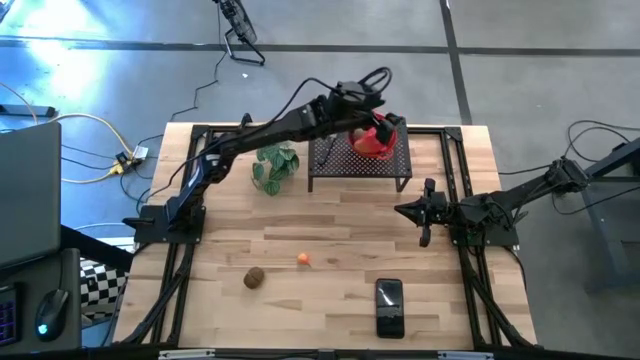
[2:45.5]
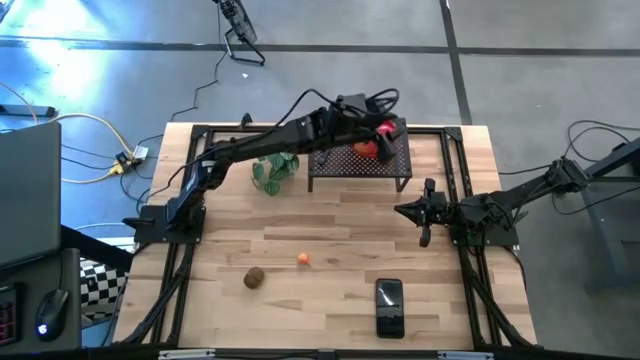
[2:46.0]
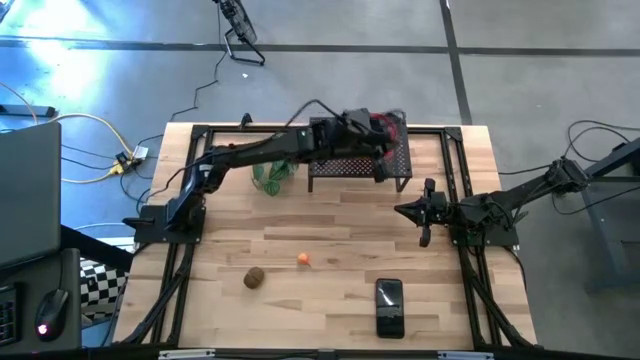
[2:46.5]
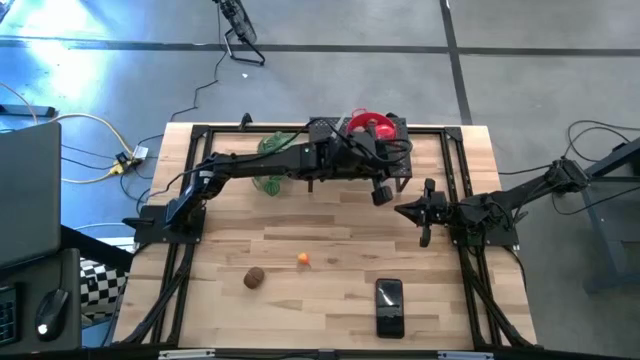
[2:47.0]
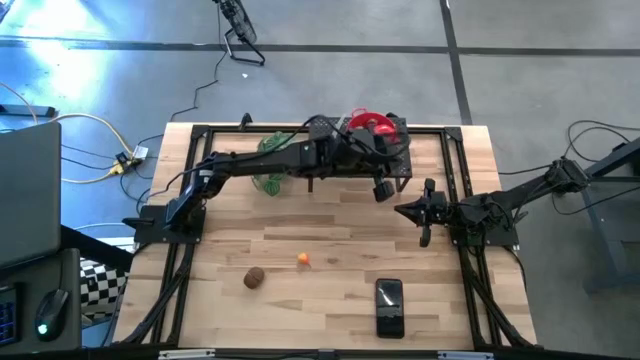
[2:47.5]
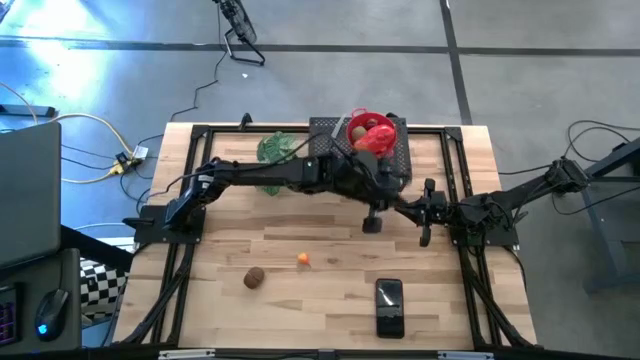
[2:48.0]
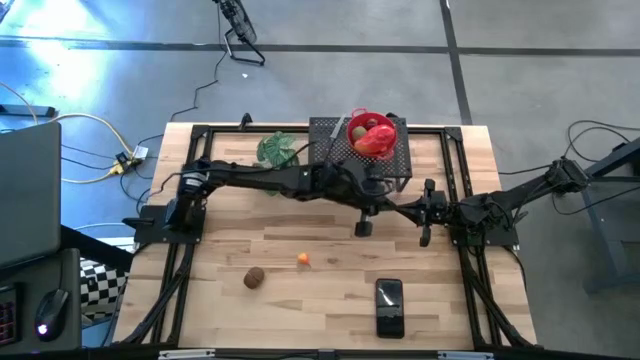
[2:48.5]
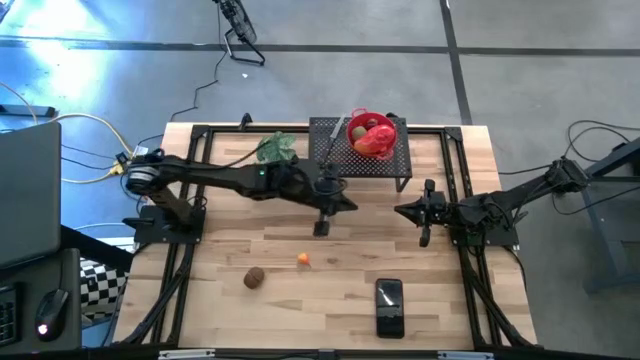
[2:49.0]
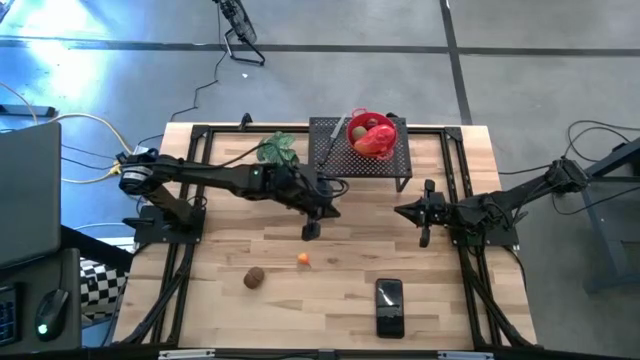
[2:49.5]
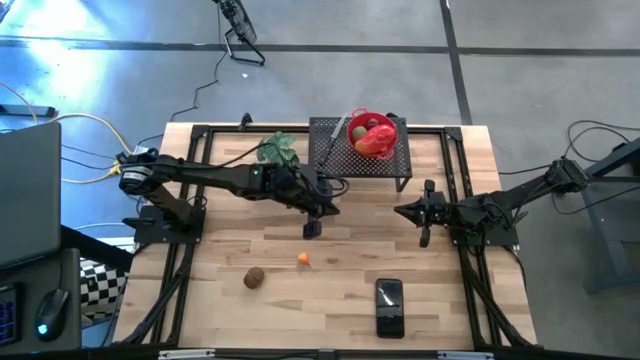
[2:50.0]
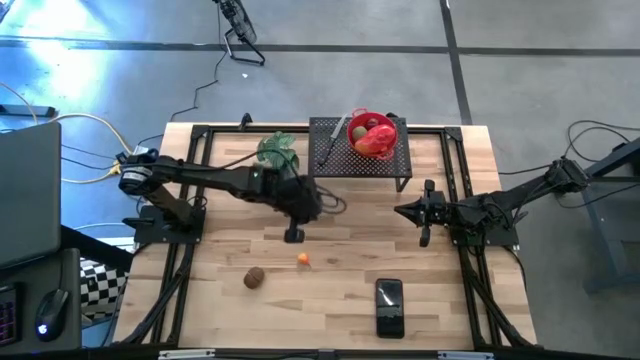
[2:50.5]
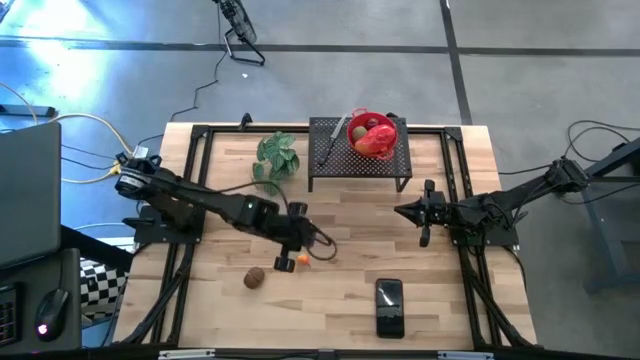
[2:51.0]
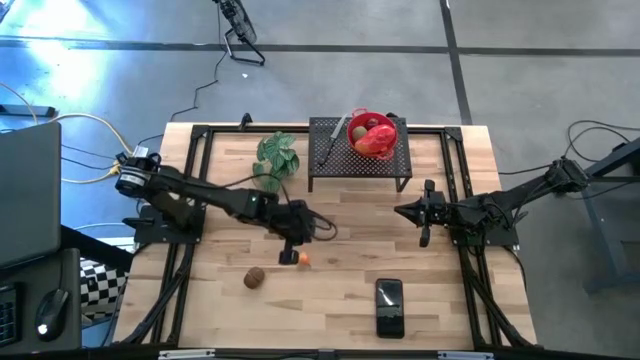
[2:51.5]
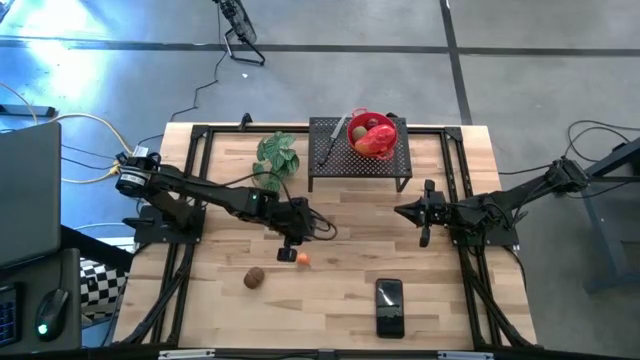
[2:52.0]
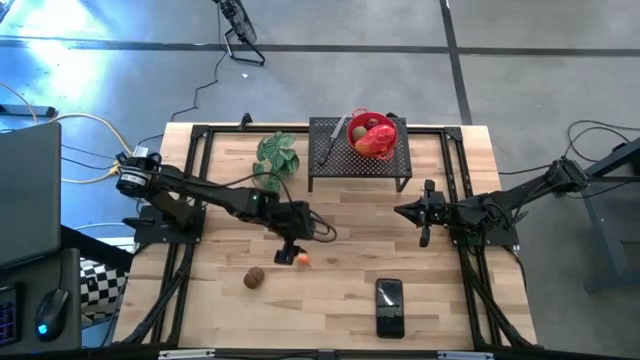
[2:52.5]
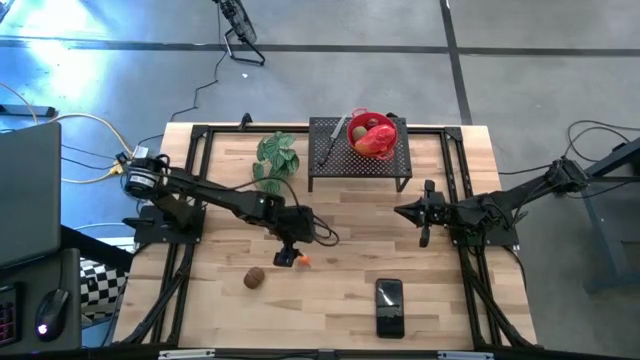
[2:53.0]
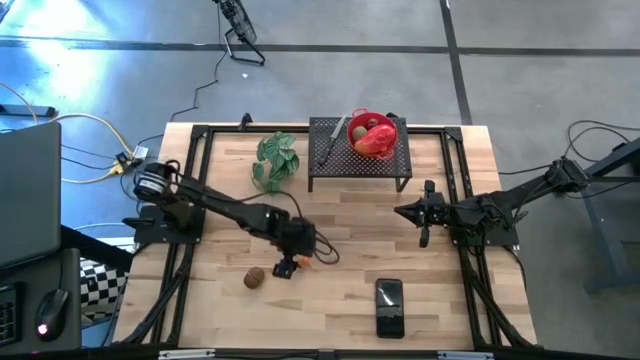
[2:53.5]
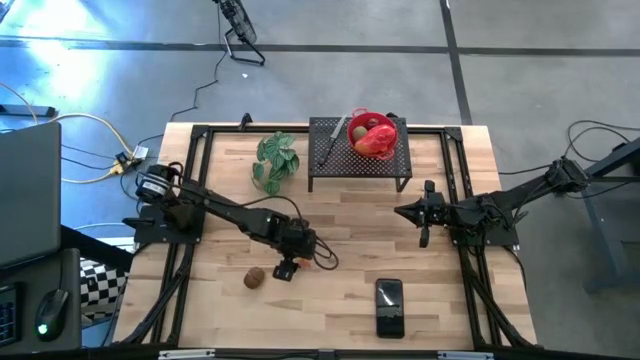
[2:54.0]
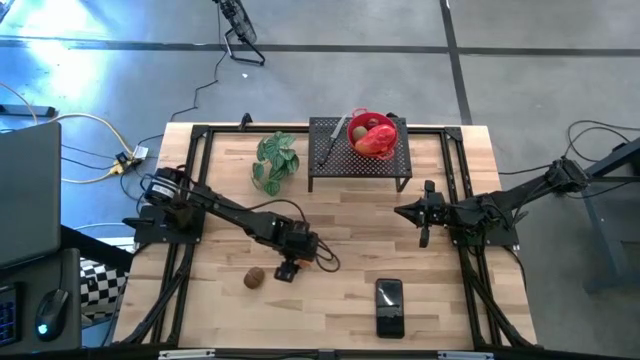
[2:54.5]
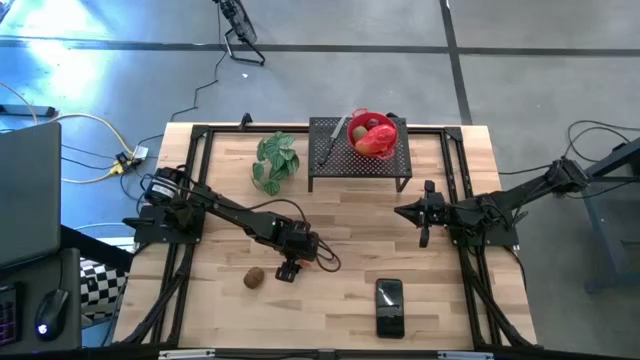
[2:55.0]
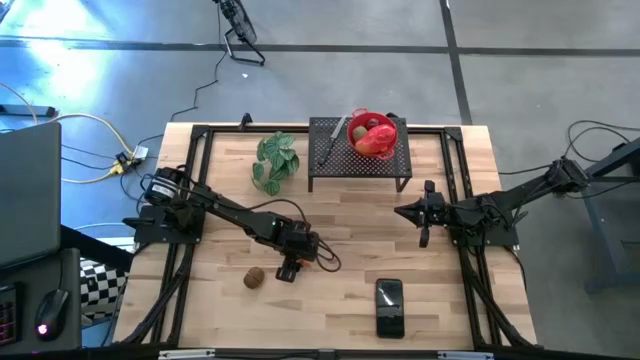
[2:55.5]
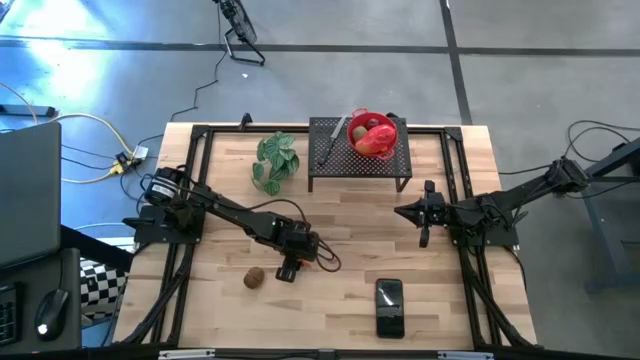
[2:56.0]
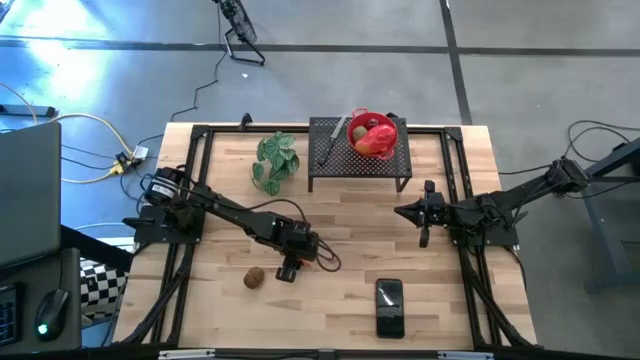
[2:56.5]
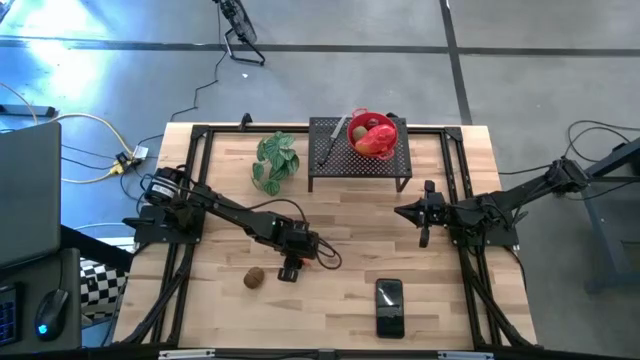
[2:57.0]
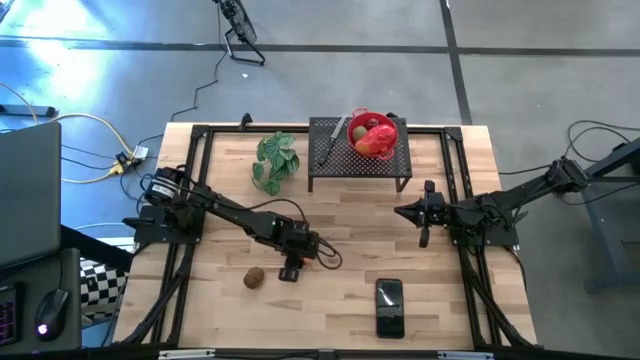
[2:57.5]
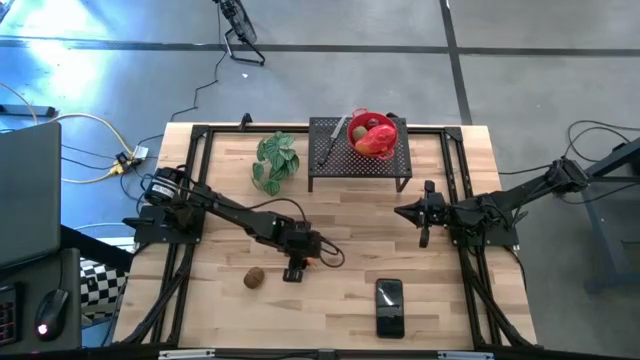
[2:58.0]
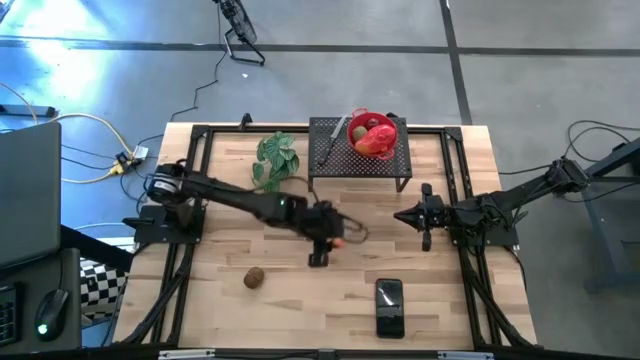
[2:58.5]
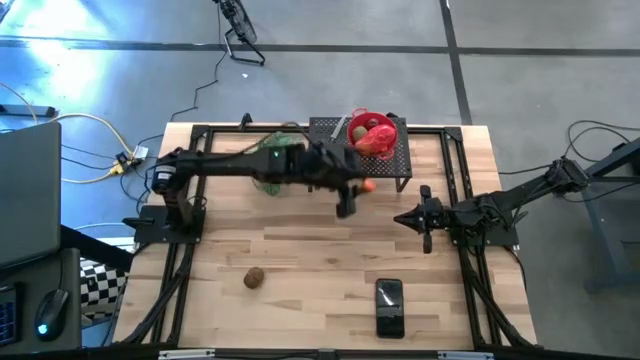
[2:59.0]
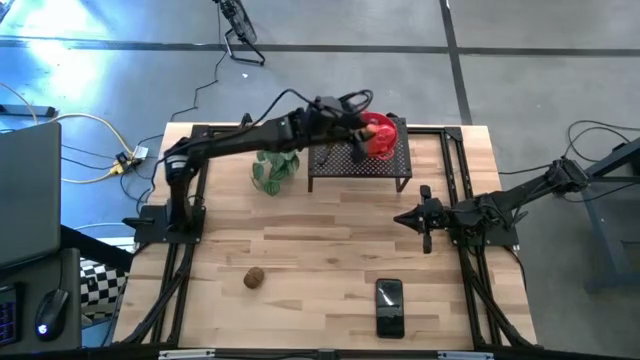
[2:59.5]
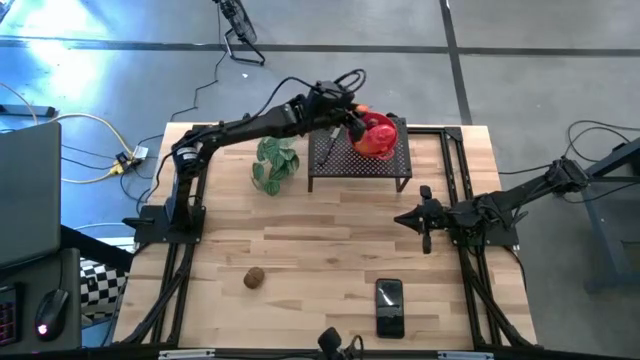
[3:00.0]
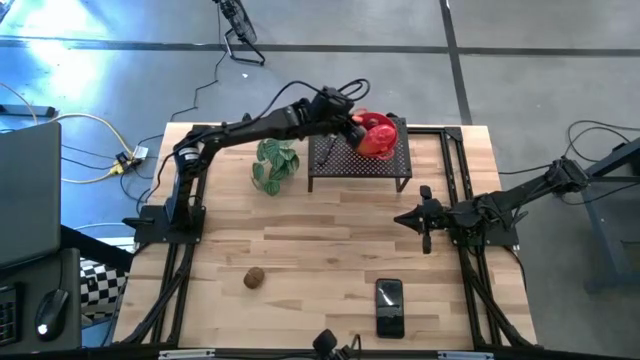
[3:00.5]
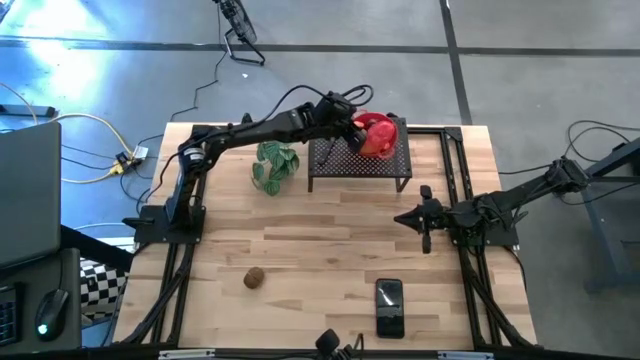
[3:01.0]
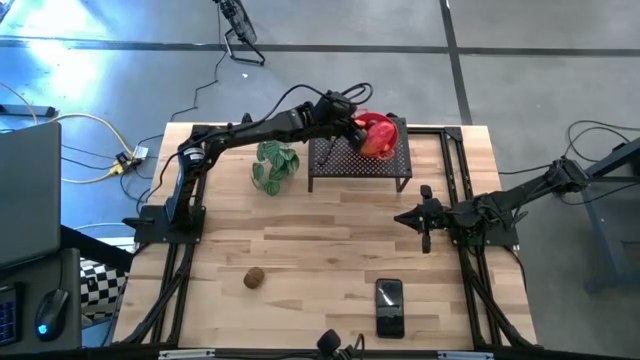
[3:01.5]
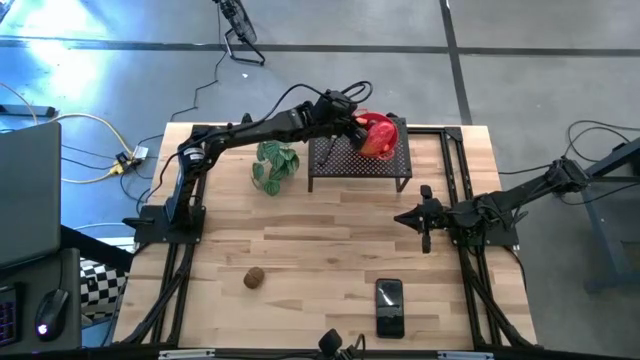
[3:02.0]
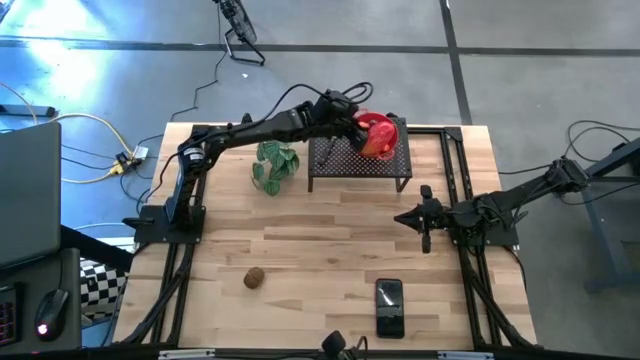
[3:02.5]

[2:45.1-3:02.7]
Task: Pick & Place Fruit
Put the yellow pear into the red strainer bowl on the shelf

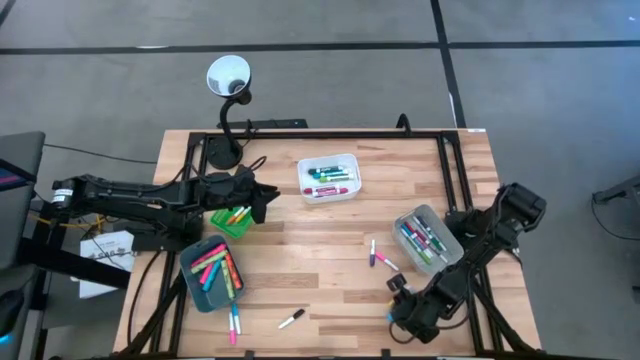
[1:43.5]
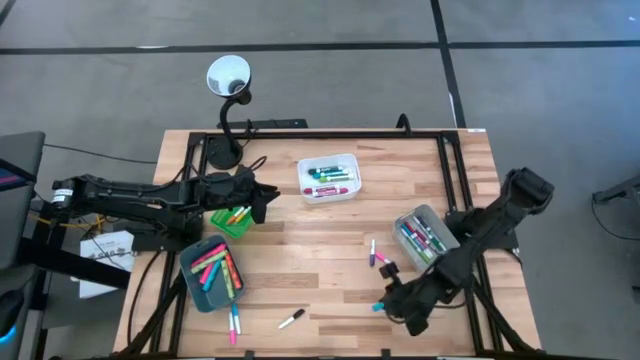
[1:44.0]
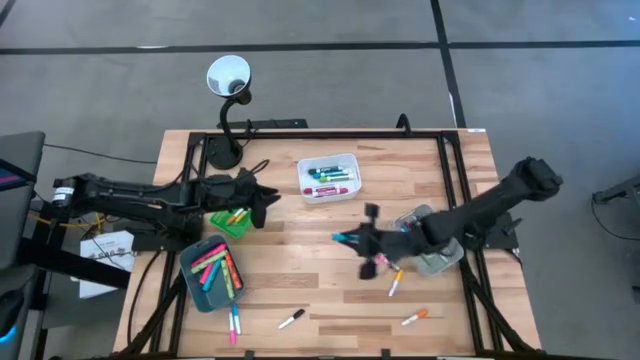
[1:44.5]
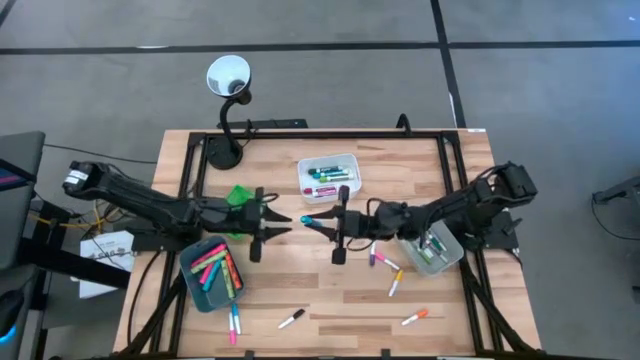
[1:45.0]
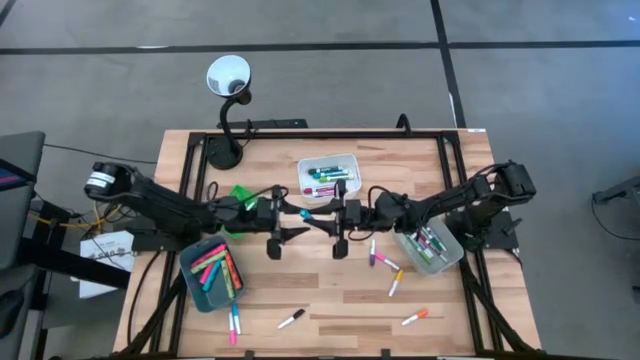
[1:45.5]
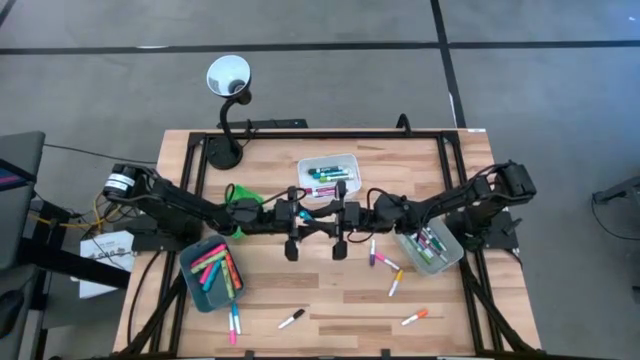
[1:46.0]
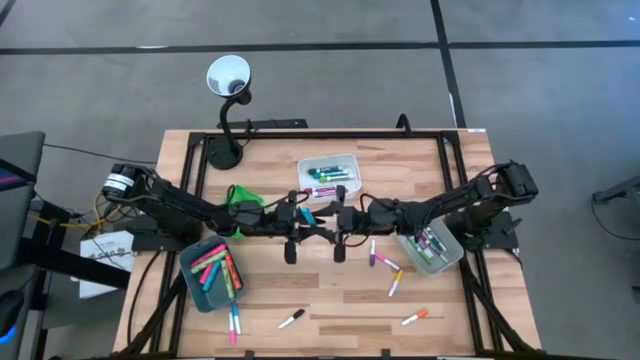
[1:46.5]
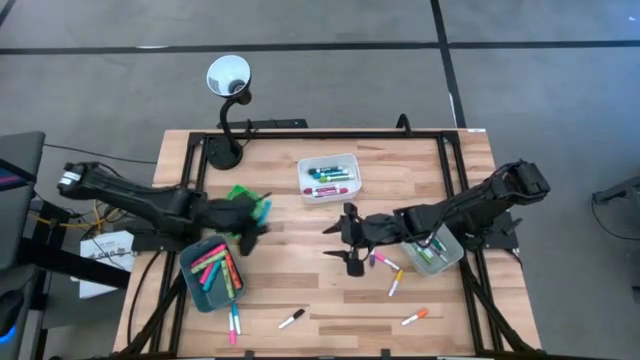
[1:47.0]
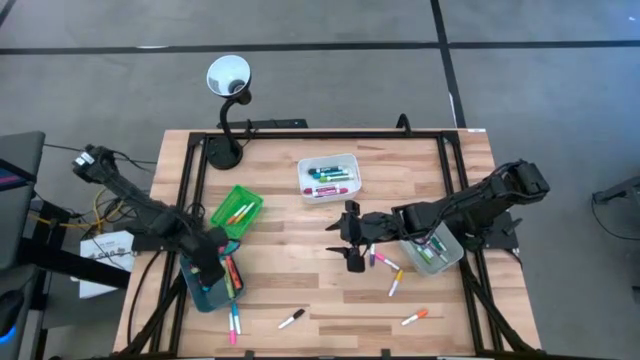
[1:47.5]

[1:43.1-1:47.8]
Task: Pick & Place Markers
Put the big blue highlighter pen into the blue bin
